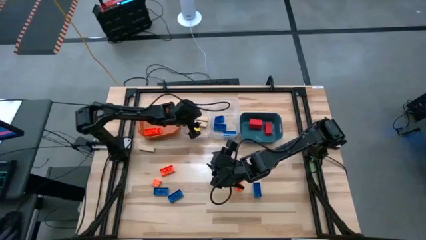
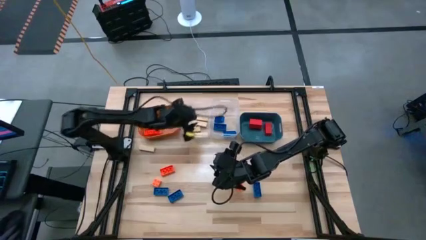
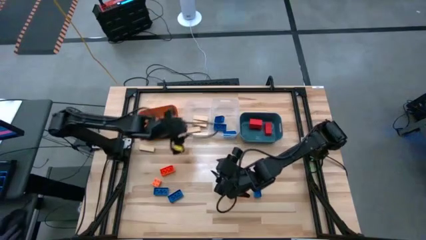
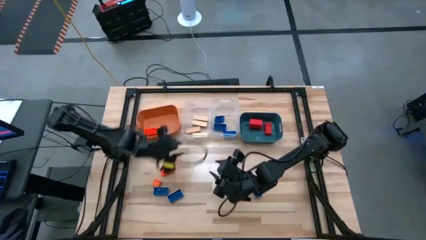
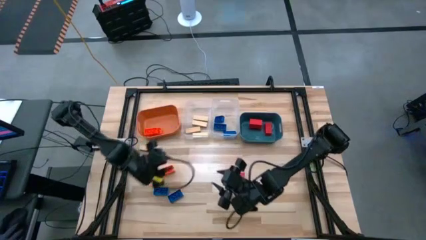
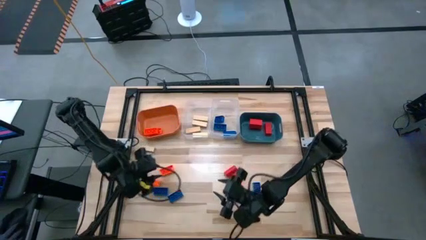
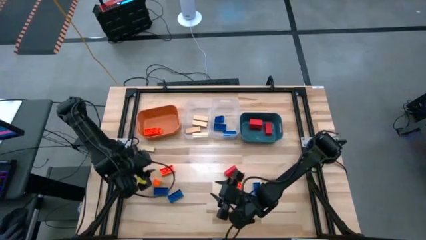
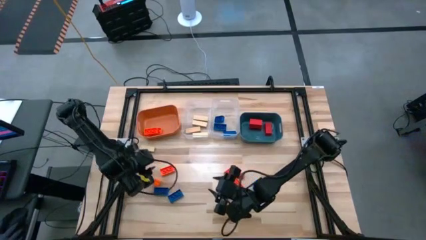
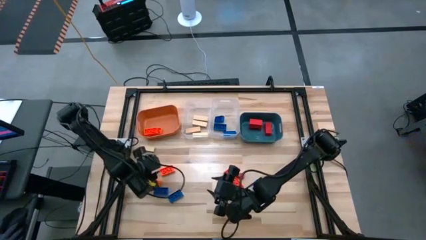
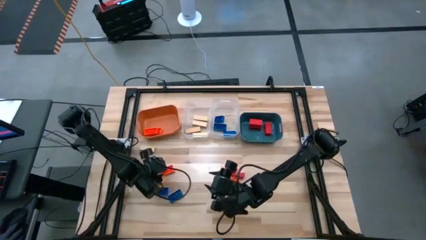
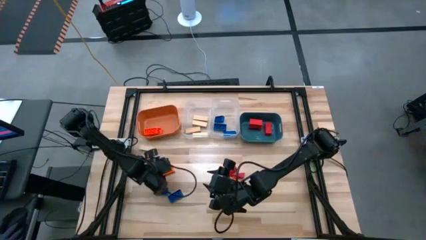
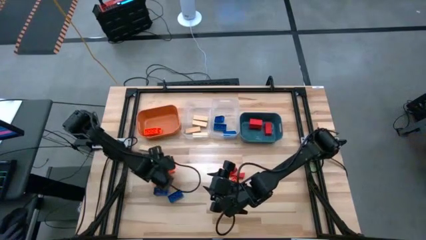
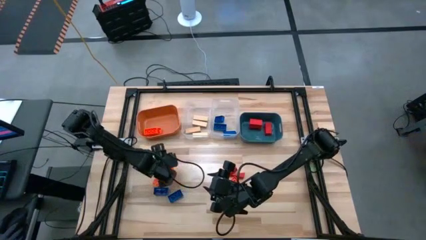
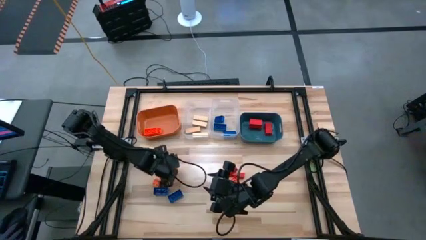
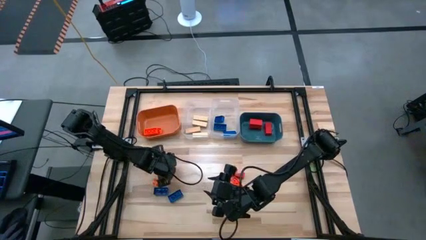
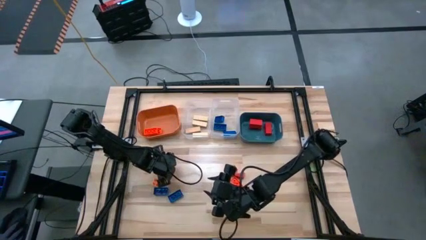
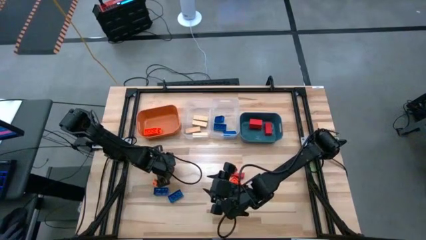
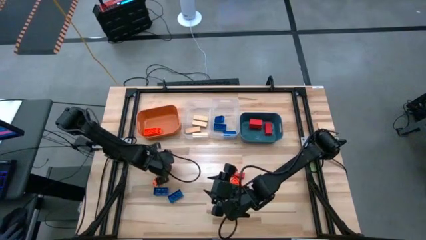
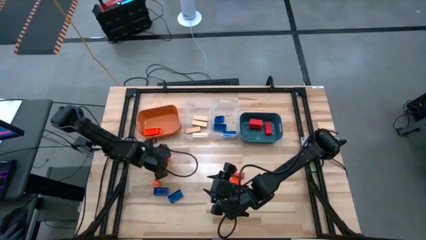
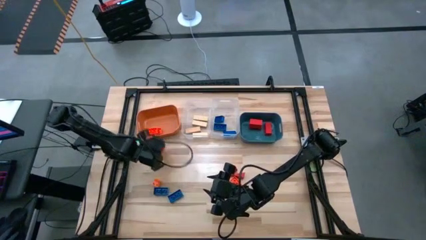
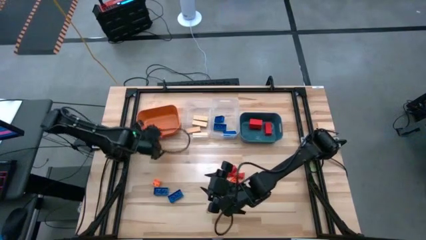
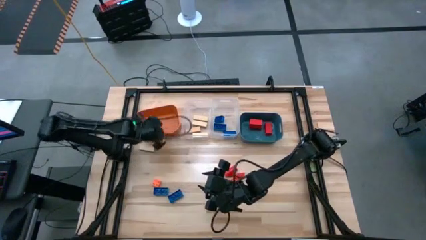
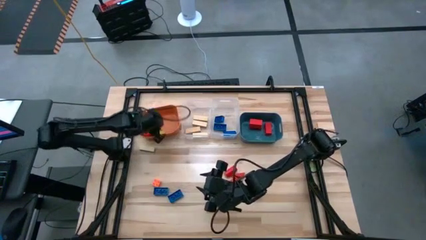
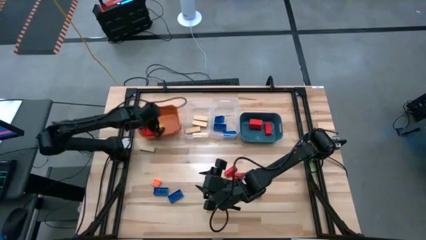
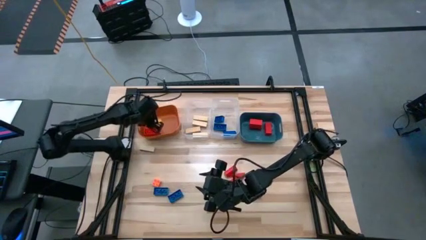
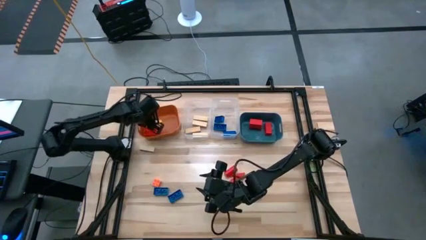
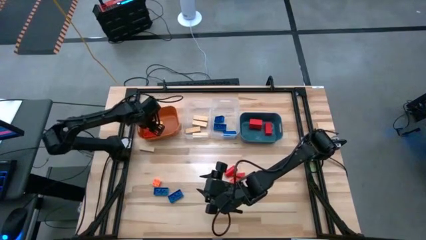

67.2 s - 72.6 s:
Task: Sort blocks
Put the orange game piece into the orange bin

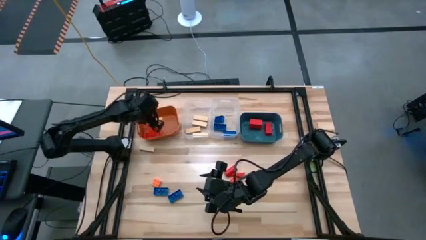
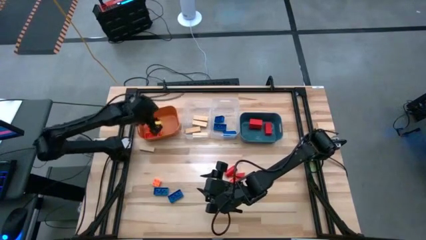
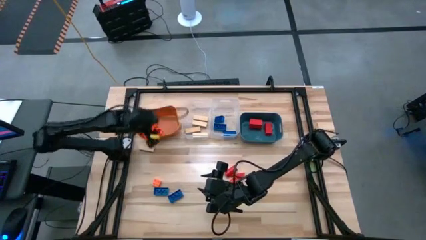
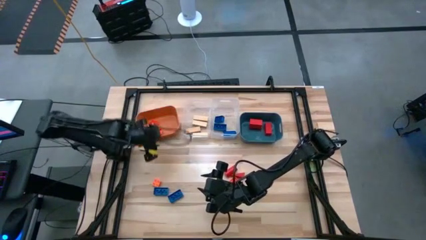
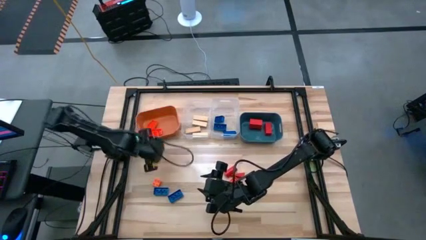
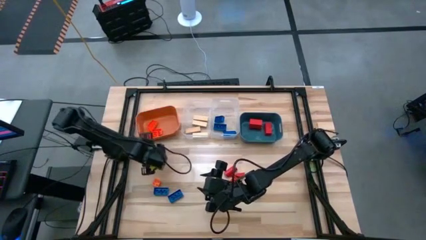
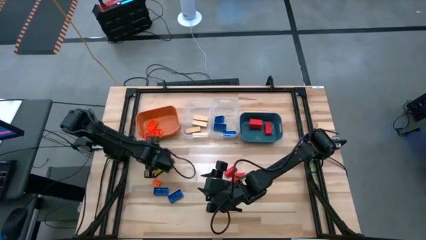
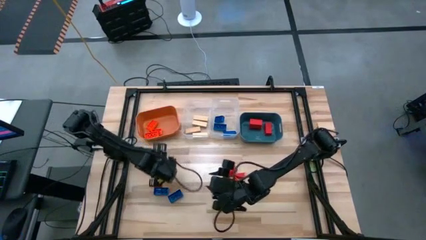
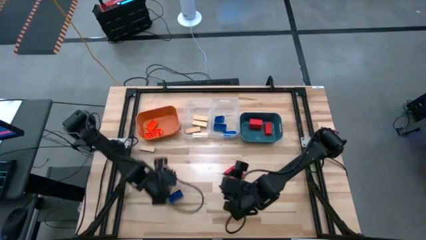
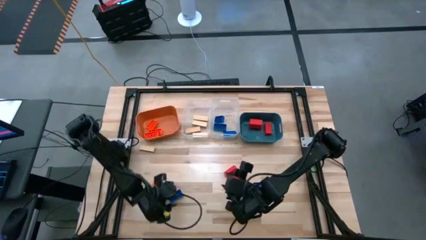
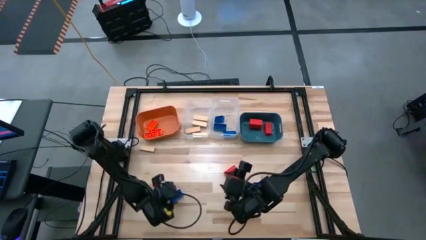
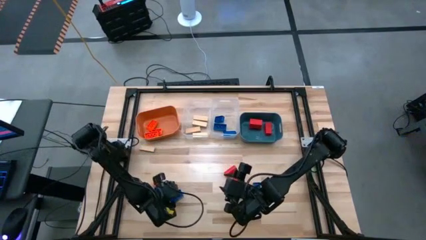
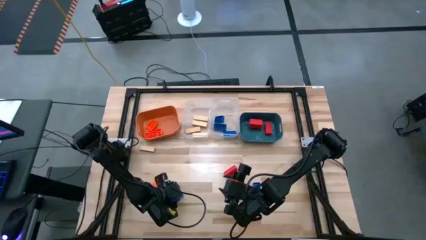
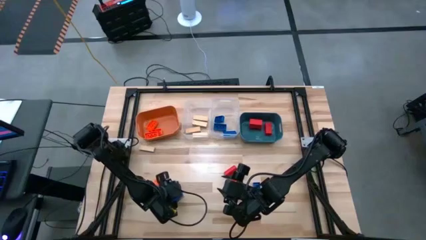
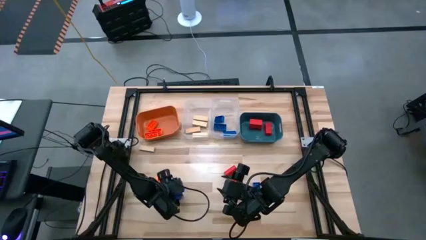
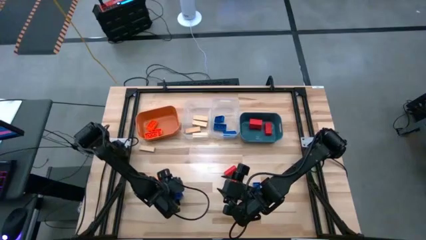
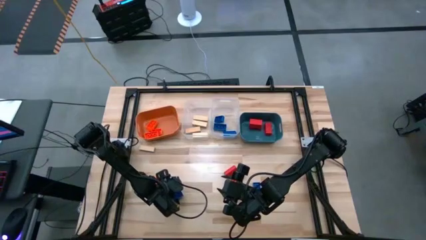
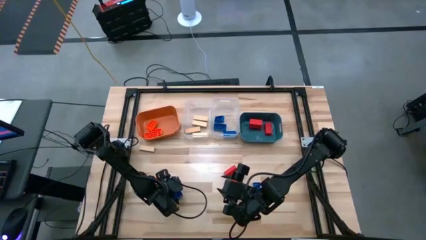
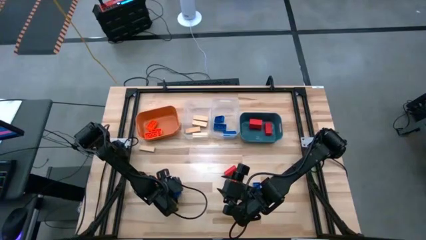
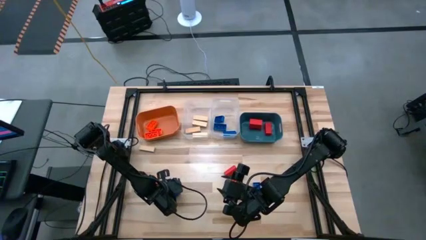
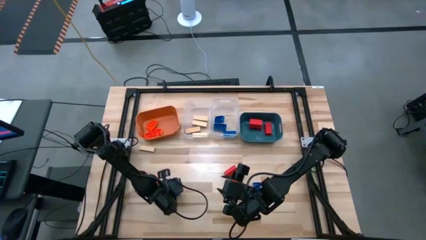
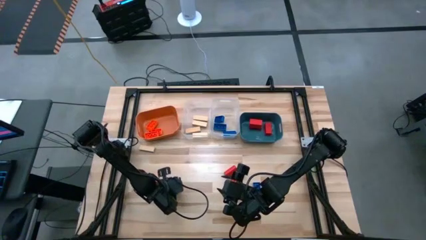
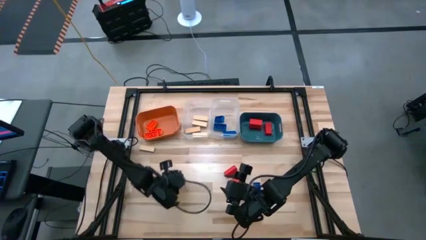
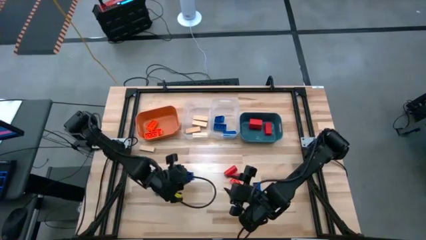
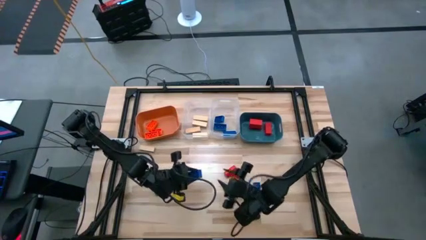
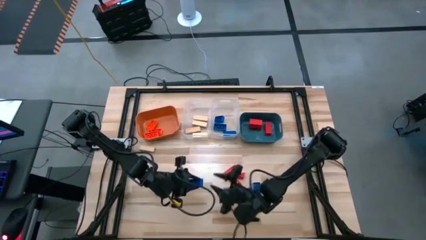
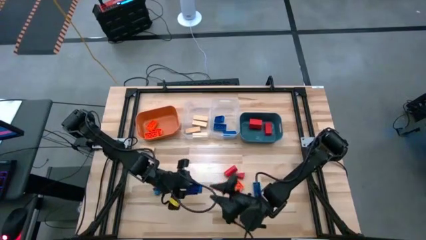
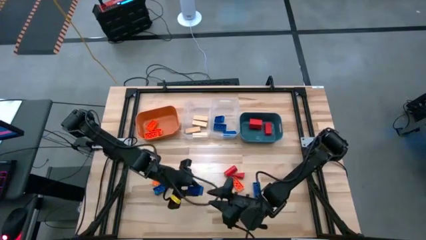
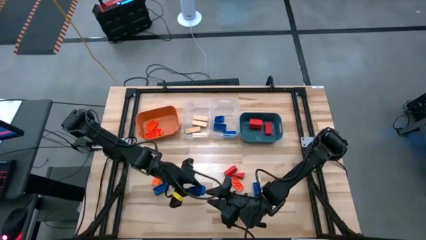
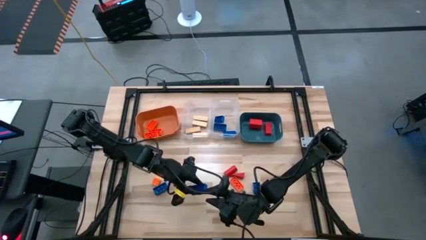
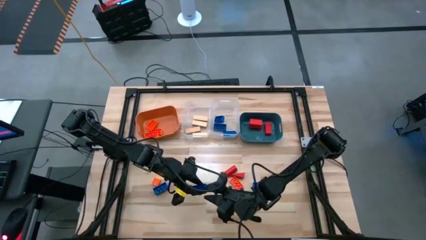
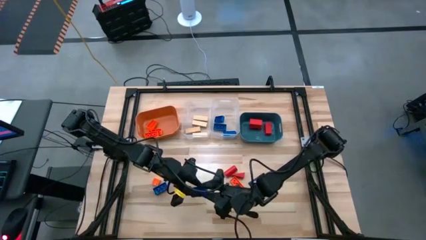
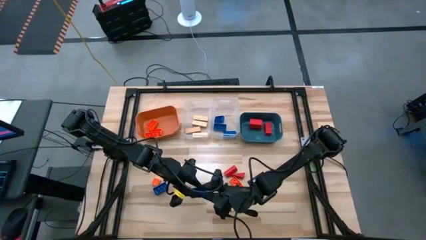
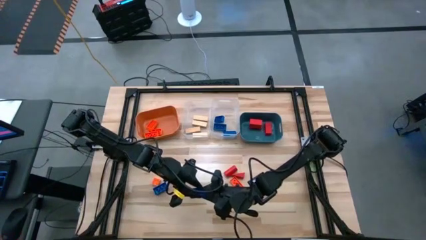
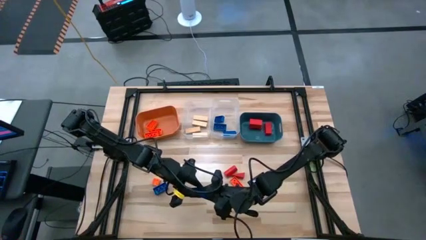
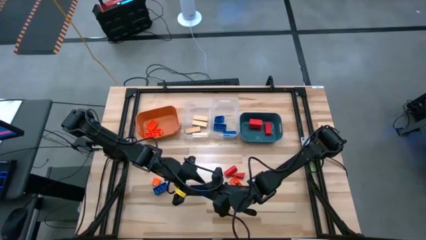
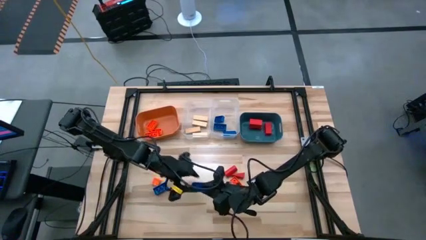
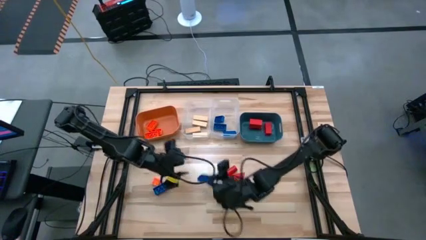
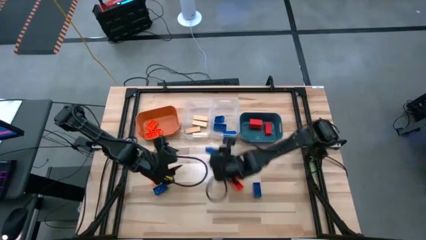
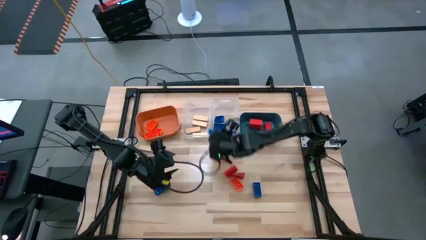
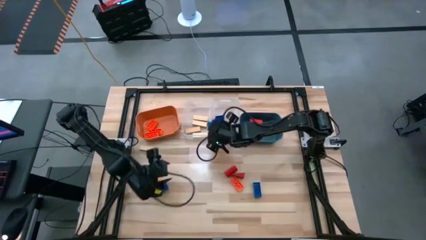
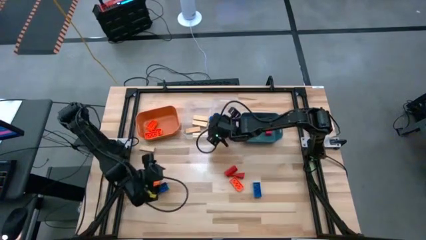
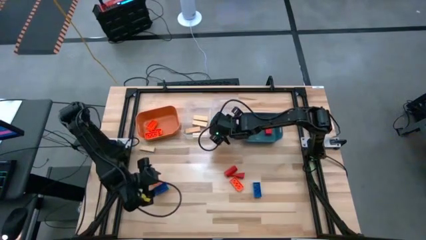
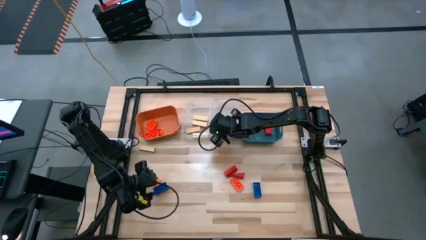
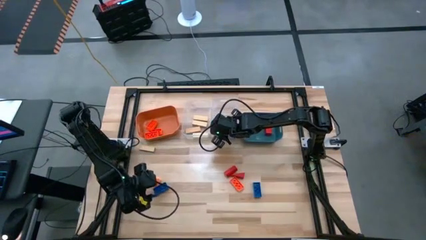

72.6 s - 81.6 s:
Put the blue game piece into the right transparent bin

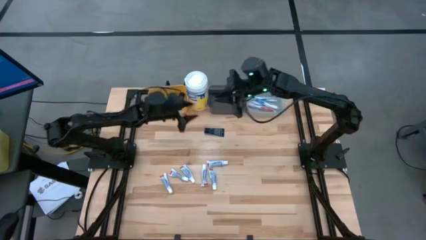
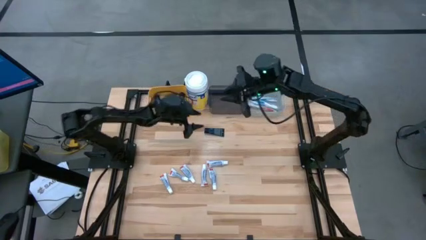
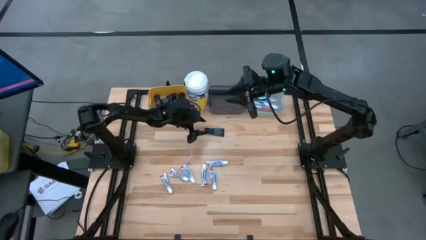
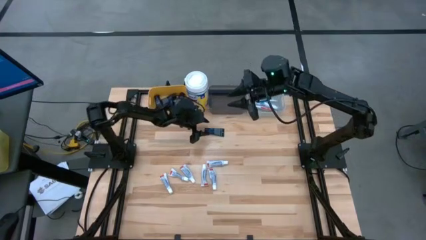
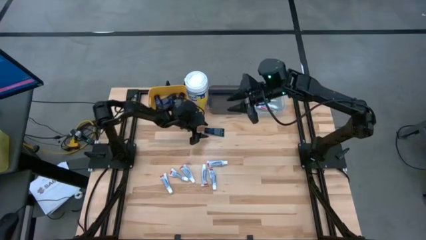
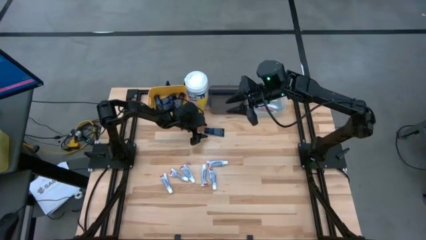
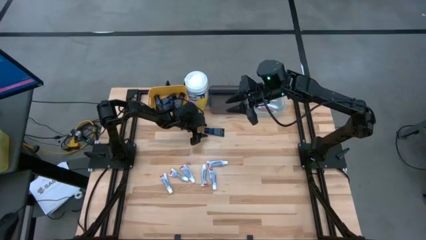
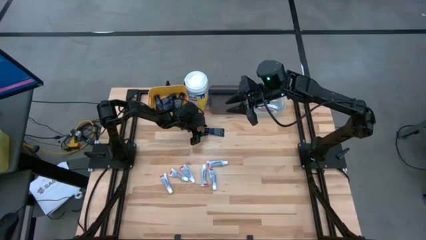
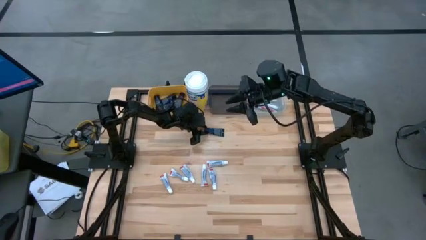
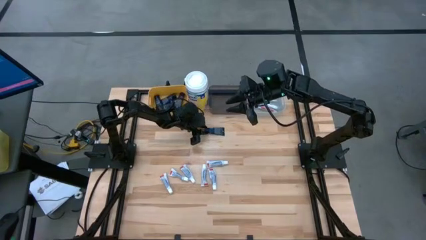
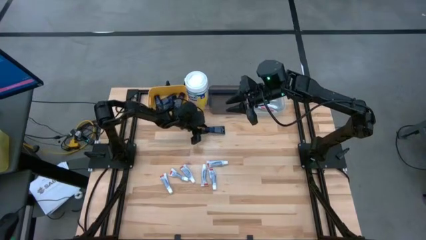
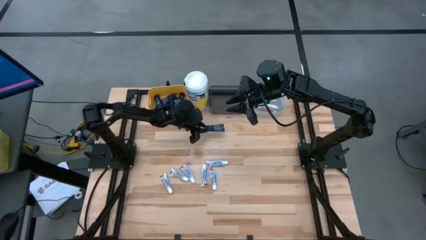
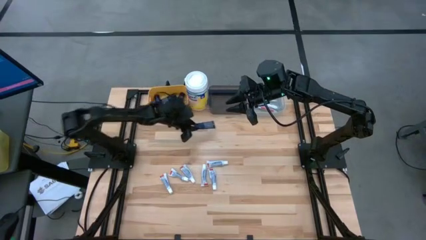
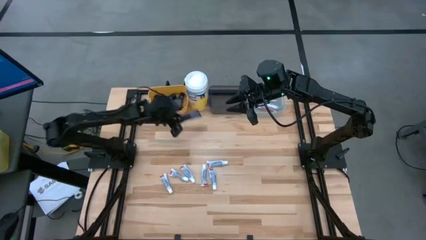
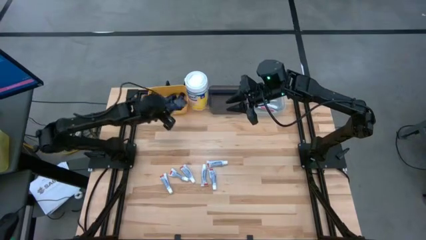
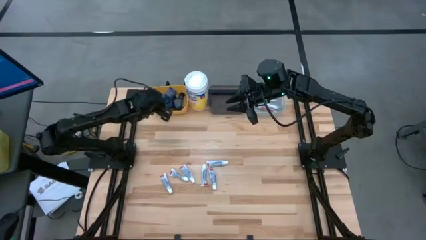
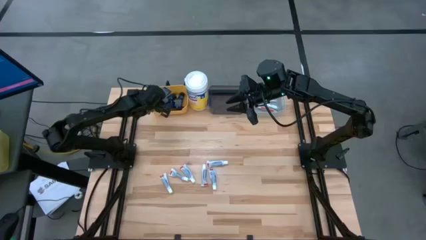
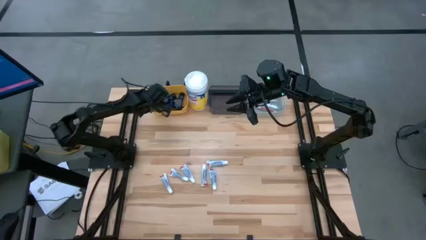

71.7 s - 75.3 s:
Task: Pick & Place Travel size toiletries
Put the blue shave cream into the yellow bin
